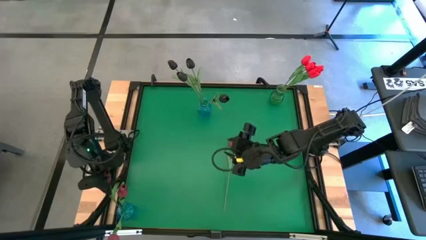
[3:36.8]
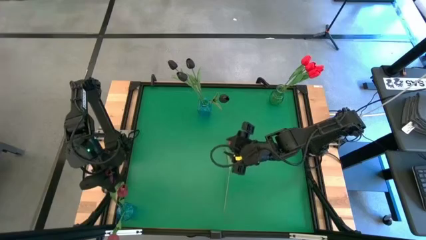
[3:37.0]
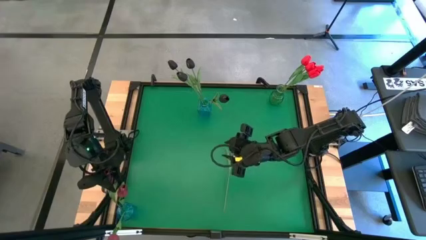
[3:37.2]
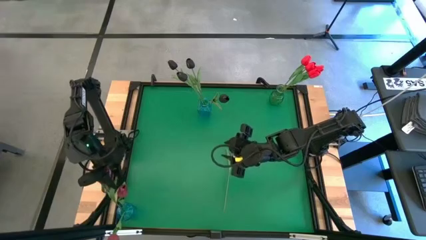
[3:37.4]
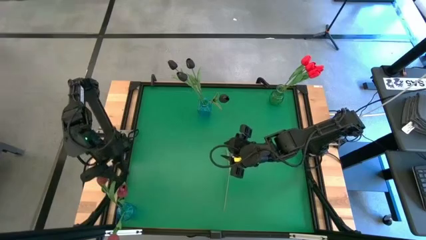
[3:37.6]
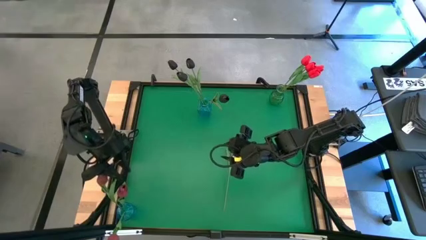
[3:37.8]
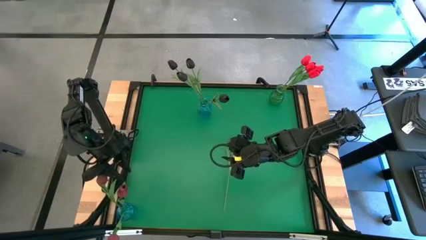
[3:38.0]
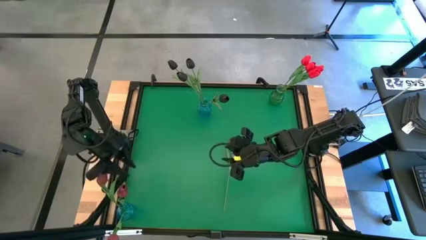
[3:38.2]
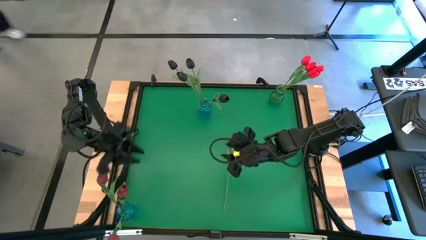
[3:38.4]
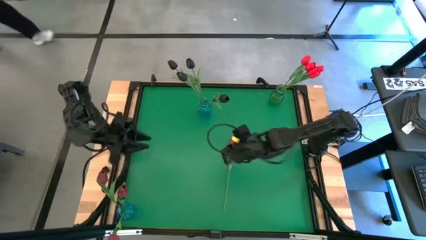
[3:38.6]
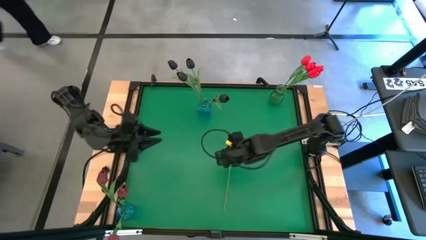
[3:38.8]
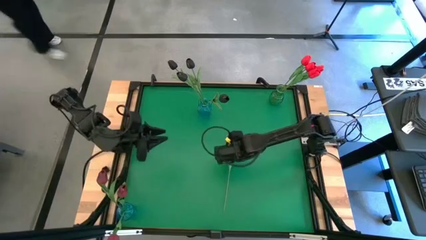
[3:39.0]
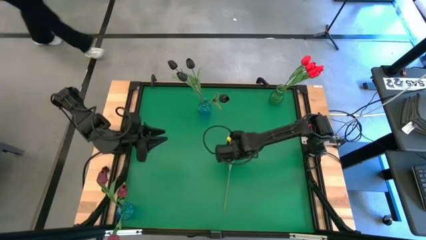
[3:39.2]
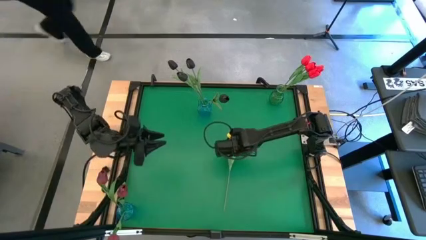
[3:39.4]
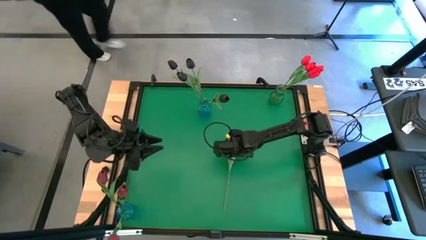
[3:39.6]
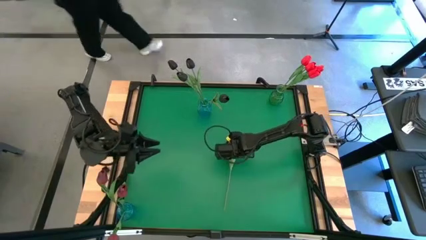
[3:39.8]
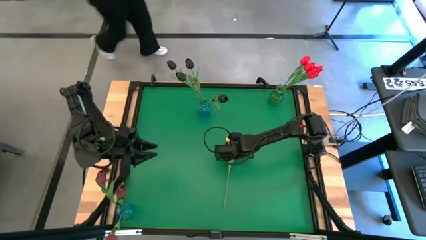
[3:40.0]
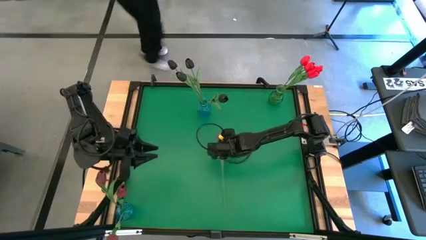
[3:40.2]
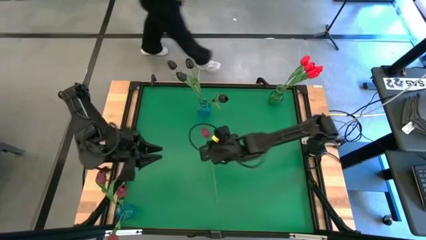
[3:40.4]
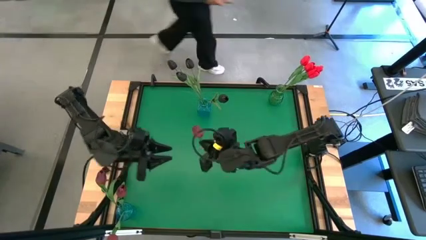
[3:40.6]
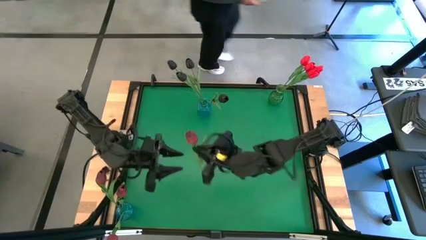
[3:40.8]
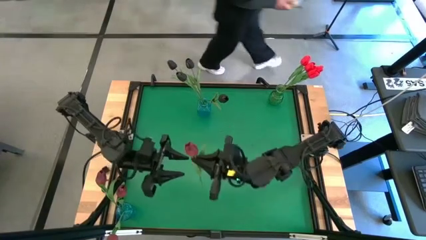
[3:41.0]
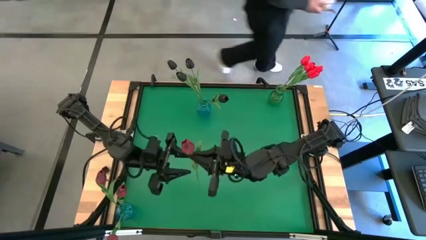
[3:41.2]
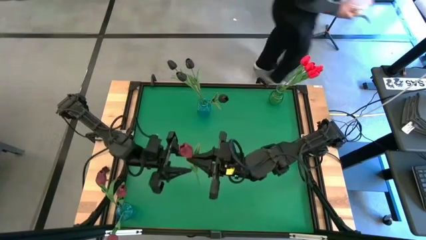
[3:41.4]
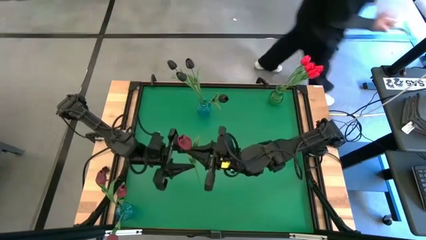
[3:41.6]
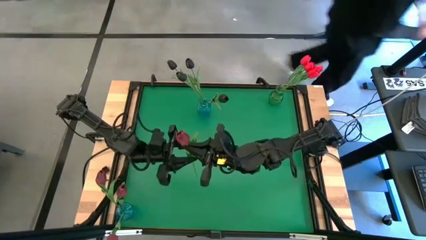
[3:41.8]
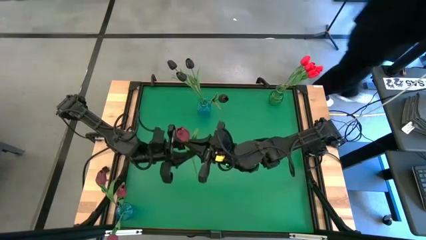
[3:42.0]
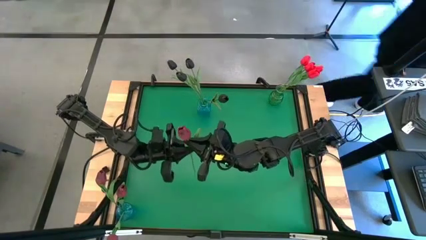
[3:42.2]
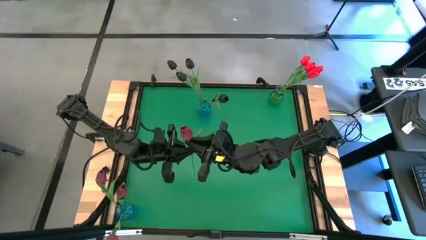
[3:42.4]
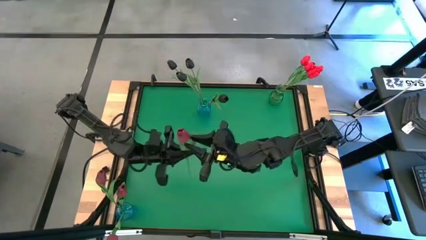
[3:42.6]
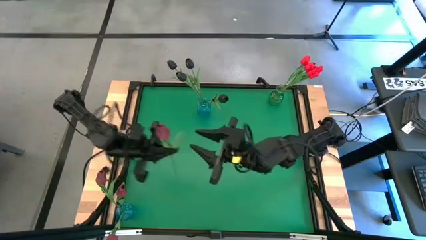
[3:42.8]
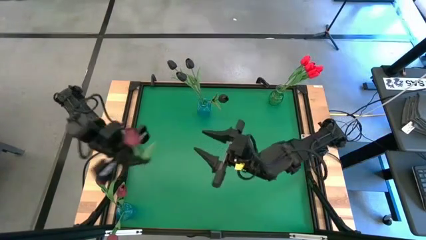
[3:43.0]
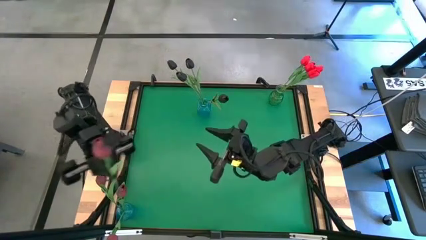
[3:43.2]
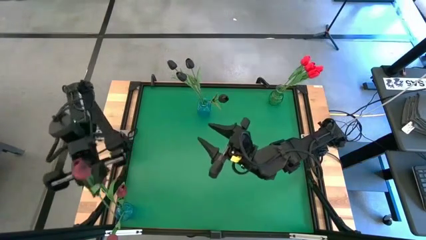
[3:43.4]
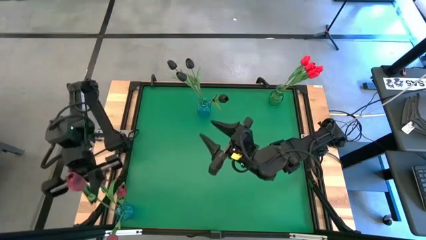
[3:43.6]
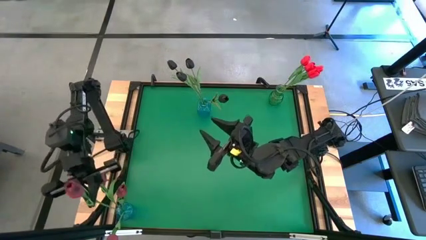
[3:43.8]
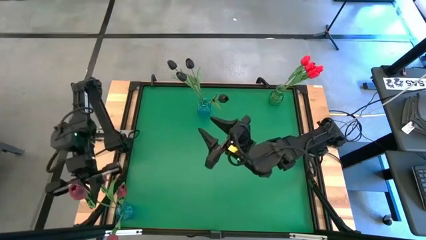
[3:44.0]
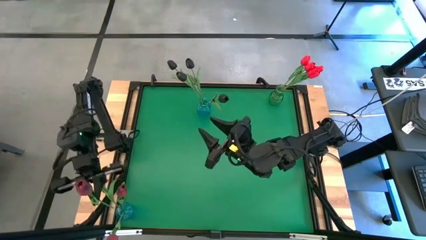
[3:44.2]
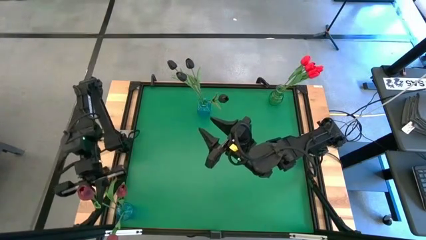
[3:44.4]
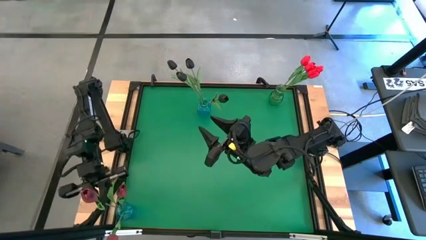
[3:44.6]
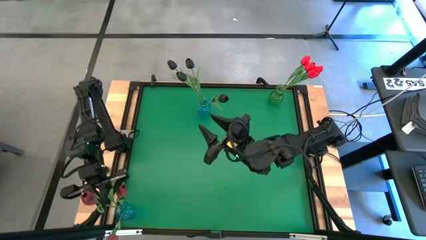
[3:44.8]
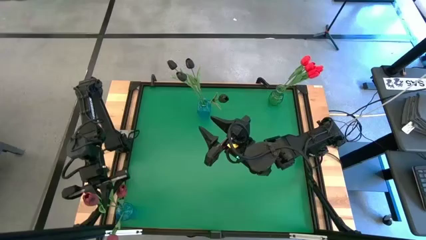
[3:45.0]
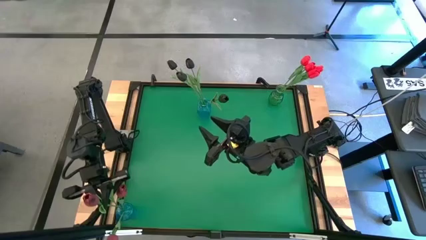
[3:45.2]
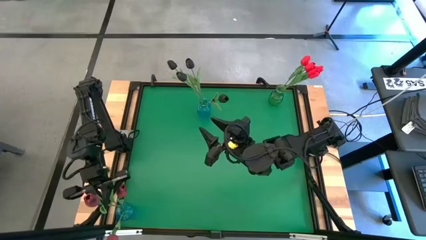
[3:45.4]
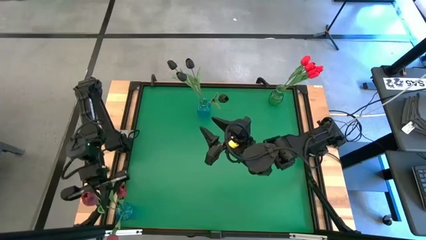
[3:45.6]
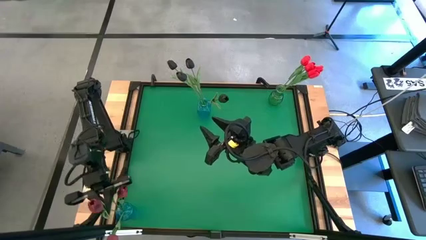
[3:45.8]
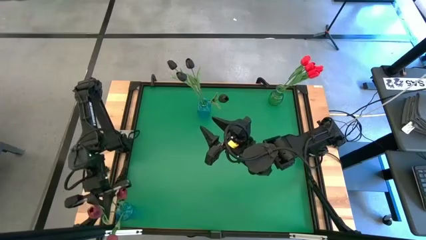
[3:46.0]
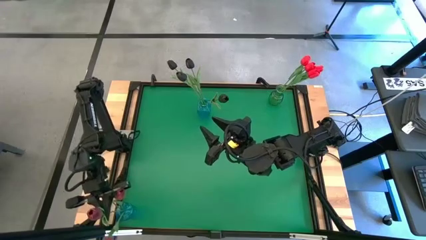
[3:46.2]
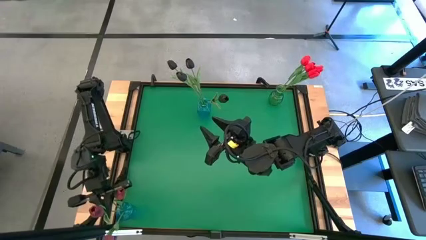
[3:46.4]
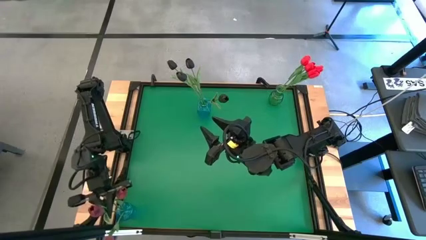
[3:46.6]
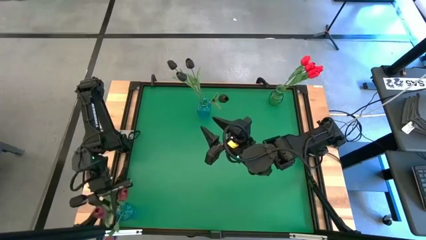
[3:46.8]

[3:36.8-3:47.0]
Task: Sort flowers into vase by color
Put the pink tulip into the bottom blue vase

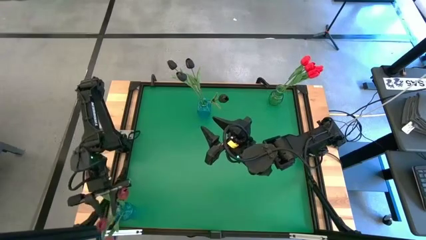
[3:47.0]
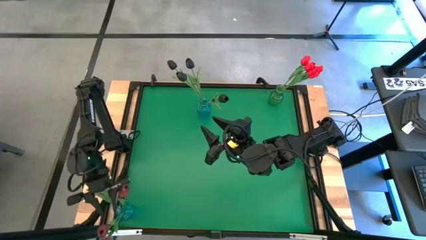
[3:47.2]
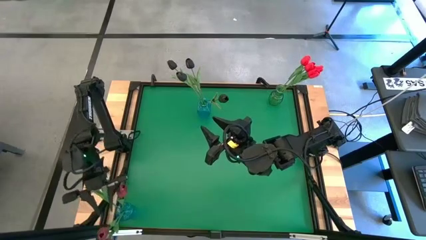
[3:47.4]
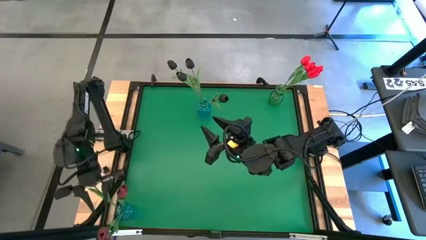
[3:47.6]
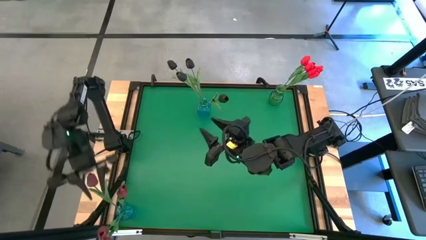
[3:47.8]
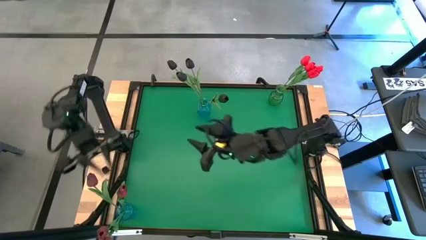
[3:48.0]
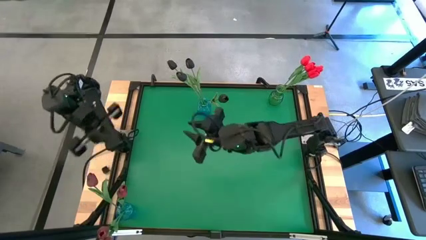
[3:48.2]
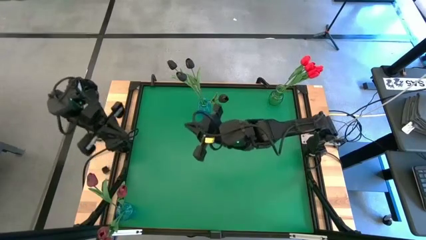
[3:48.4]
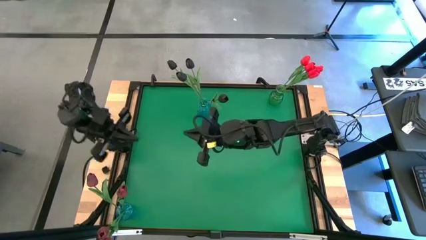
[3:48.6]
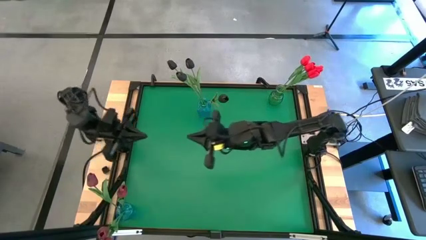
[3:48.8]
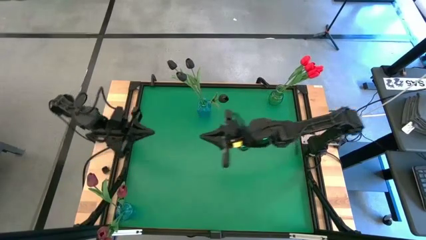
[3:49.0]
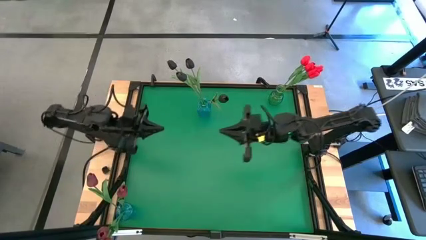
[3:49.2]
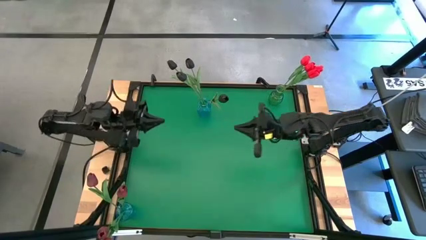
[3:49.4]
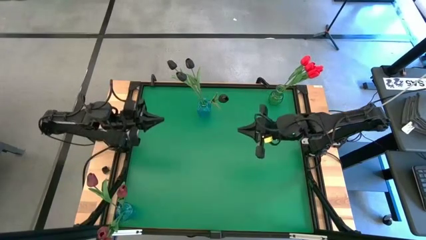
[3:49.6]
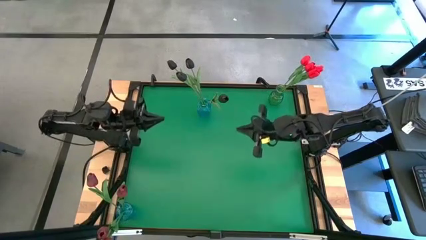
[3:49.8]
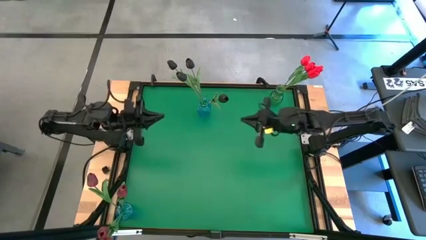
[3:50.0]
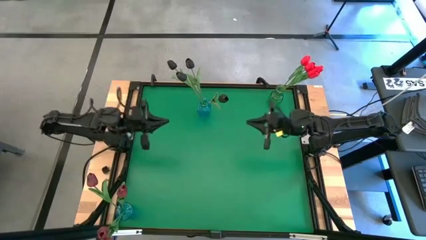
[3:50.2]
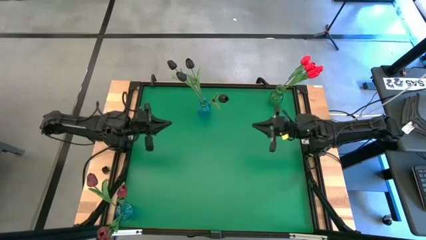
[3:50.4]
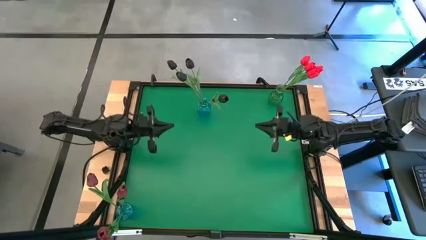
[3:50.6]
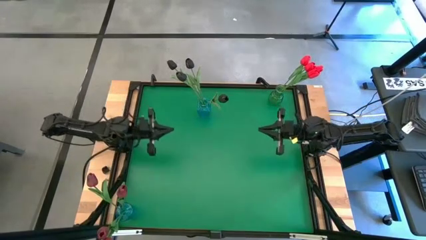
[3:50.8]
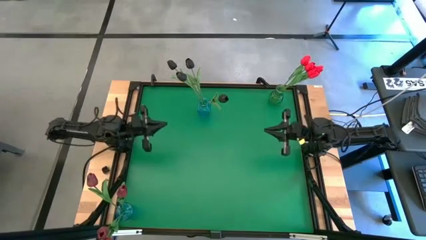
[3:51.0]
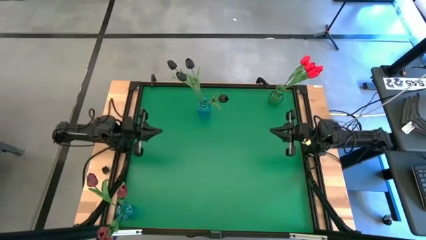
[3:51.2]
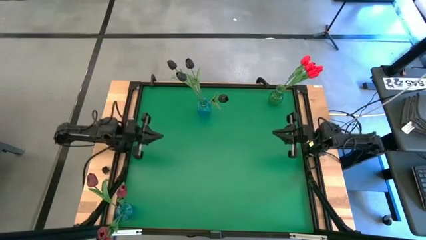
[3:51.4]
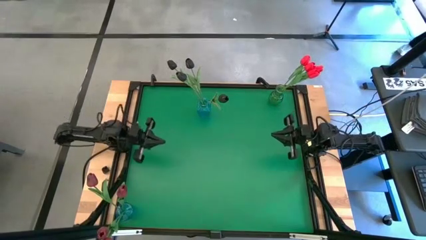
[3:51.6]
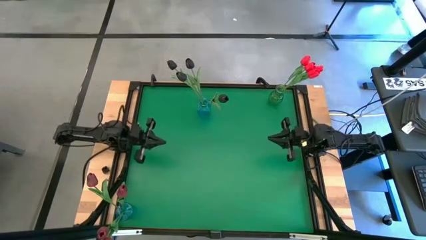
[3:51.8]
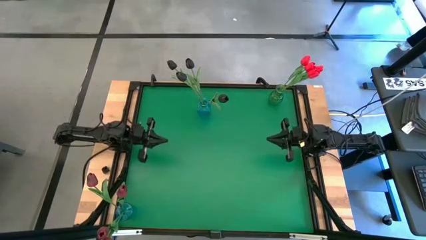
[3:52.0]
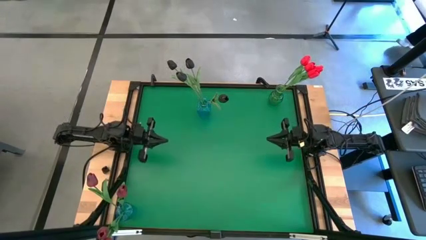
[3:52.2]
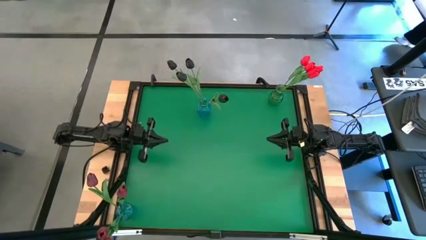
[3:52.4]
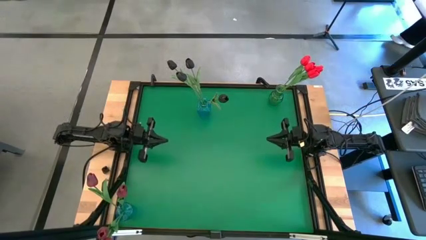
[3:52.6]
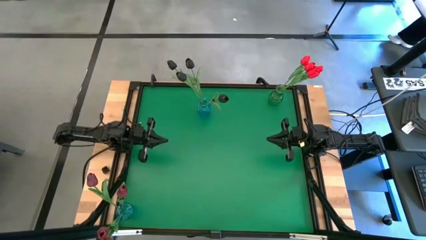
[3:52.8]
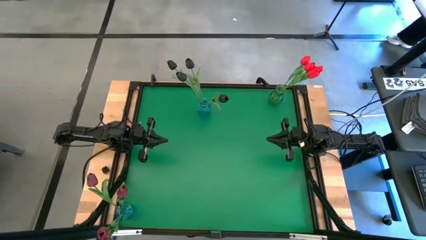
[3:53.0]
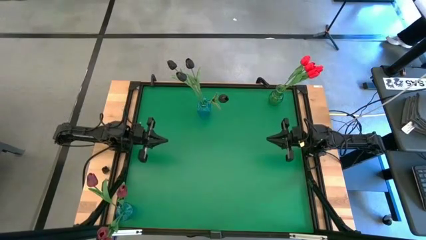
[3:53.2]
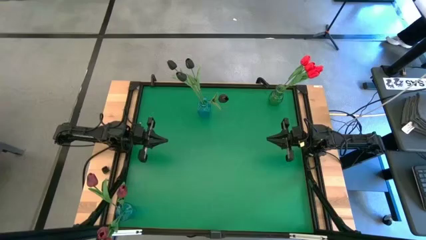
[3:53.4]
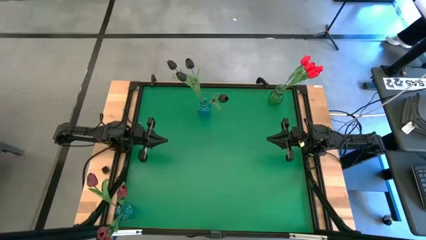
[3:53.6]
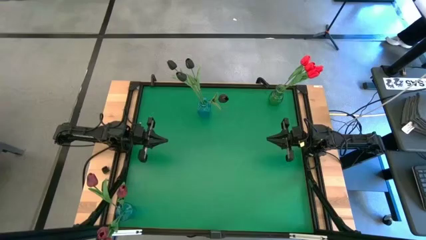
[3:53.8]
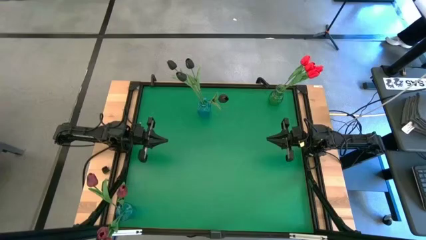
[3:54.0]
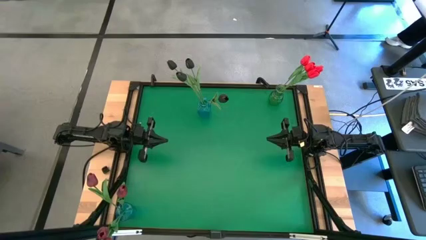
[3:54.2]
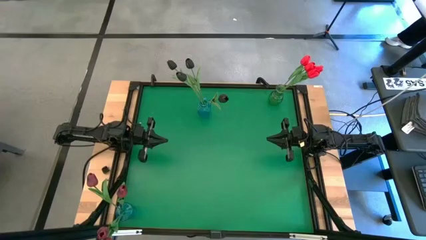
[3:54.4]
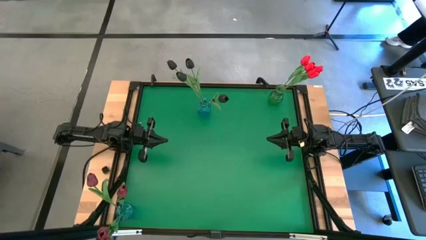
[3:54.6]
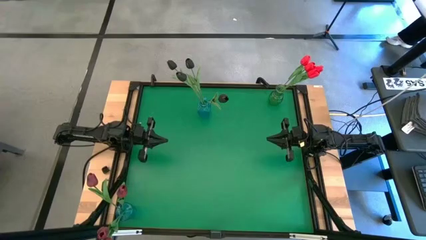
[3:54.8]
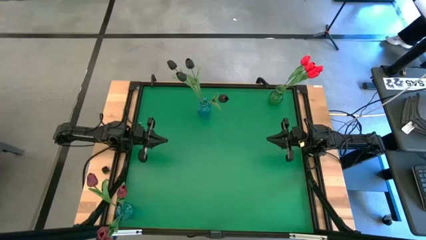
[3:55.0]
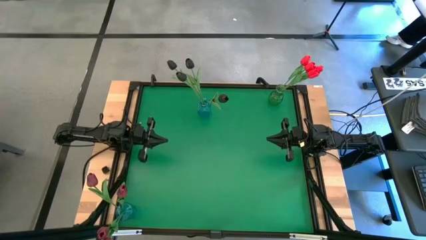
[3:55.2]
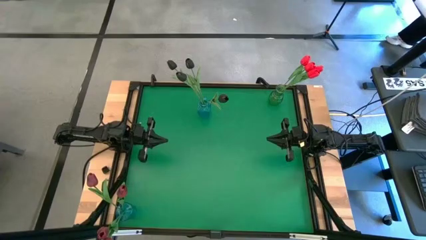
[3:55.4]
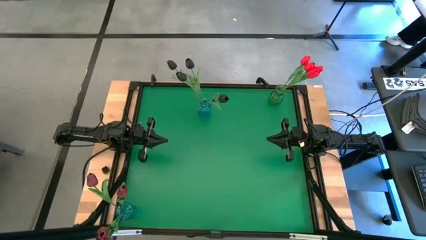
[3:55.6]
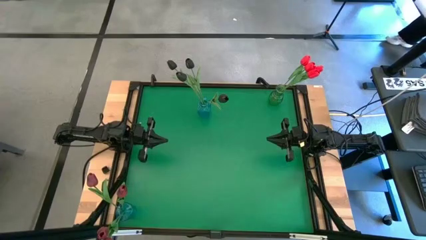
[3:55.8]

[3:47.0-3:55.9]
Return to Home Position
